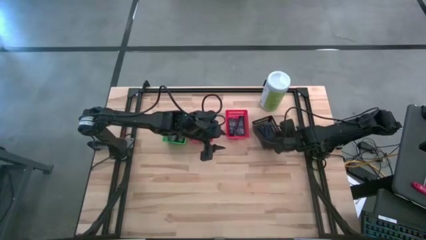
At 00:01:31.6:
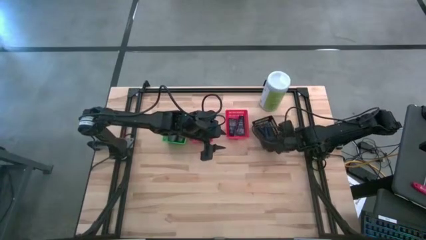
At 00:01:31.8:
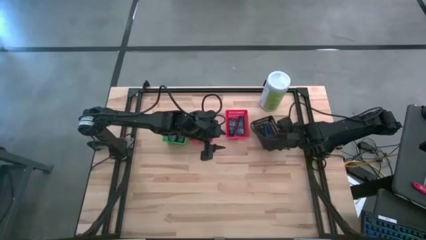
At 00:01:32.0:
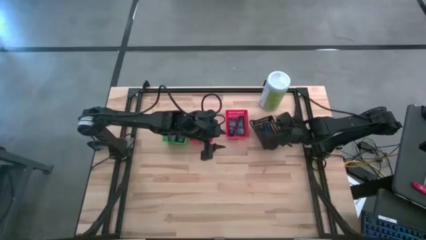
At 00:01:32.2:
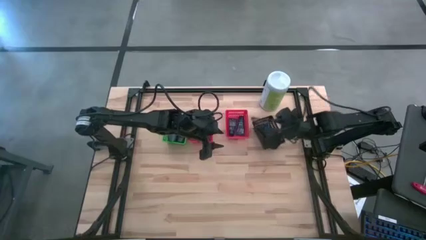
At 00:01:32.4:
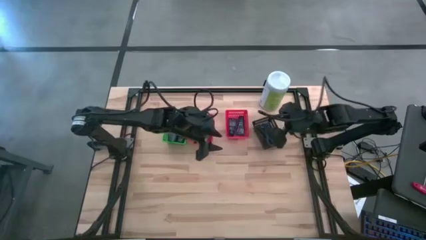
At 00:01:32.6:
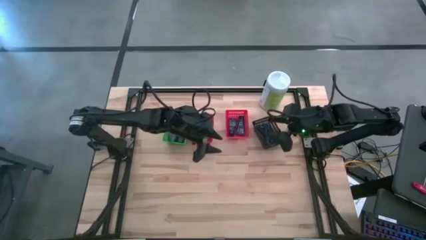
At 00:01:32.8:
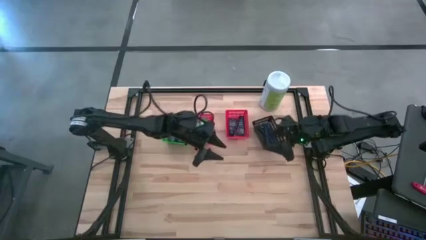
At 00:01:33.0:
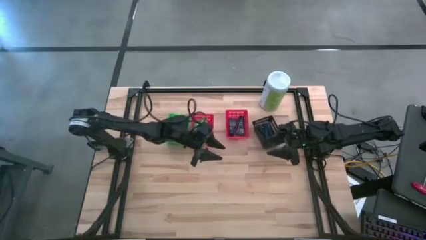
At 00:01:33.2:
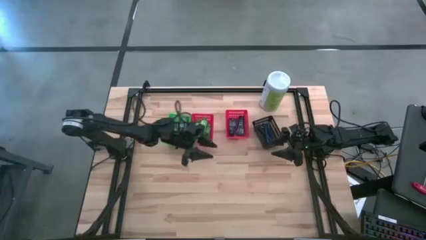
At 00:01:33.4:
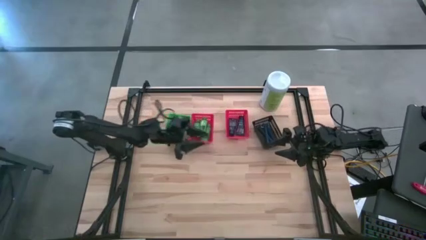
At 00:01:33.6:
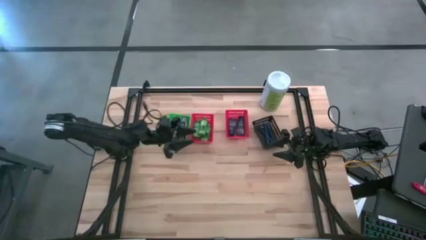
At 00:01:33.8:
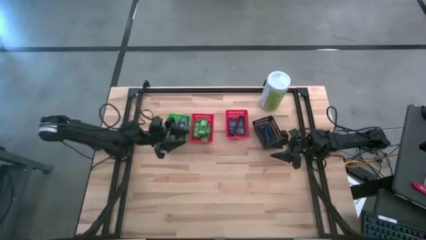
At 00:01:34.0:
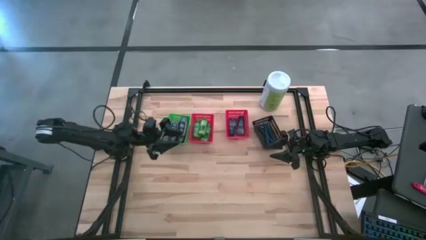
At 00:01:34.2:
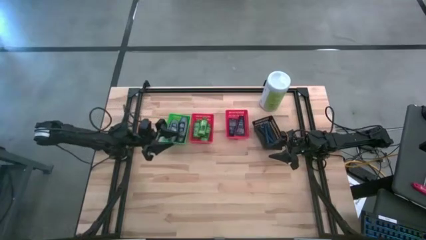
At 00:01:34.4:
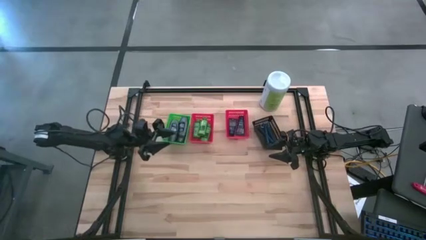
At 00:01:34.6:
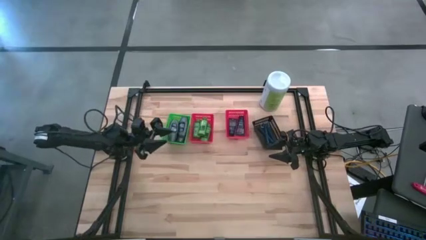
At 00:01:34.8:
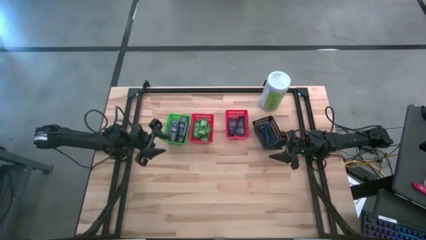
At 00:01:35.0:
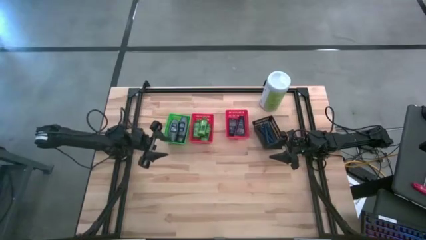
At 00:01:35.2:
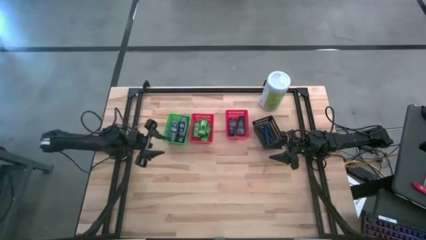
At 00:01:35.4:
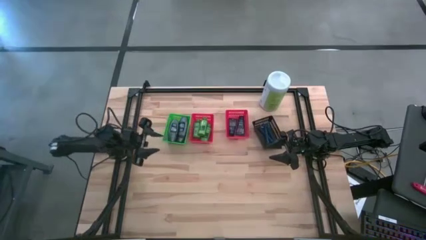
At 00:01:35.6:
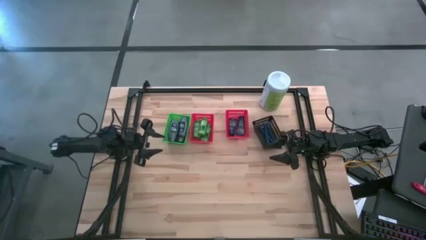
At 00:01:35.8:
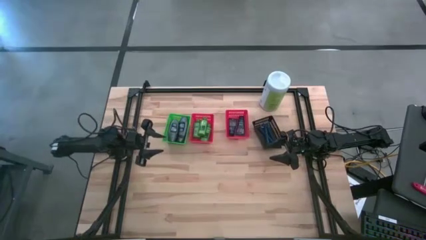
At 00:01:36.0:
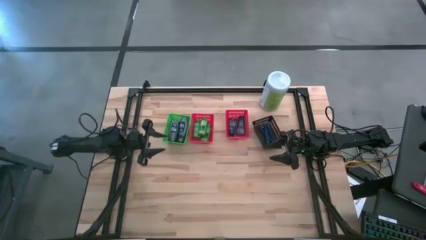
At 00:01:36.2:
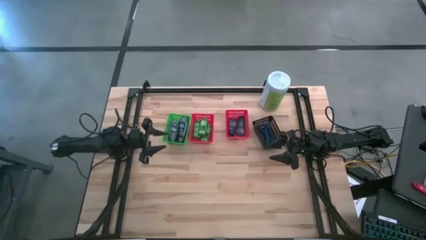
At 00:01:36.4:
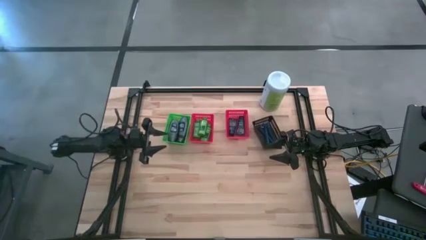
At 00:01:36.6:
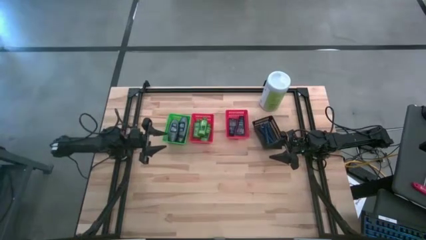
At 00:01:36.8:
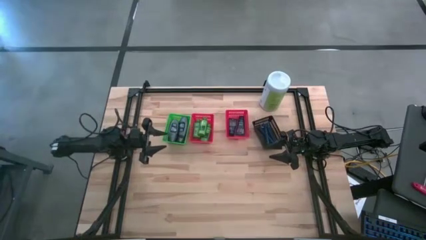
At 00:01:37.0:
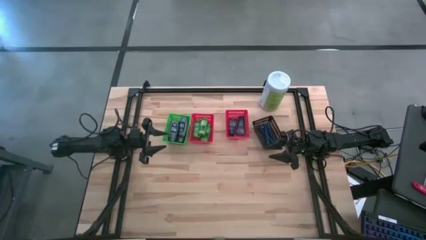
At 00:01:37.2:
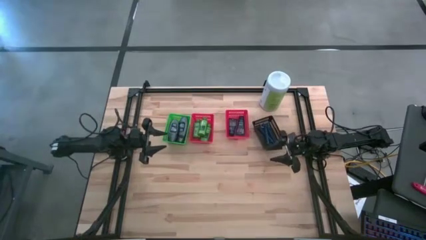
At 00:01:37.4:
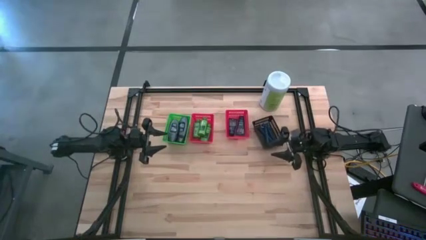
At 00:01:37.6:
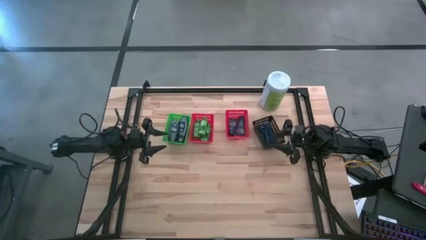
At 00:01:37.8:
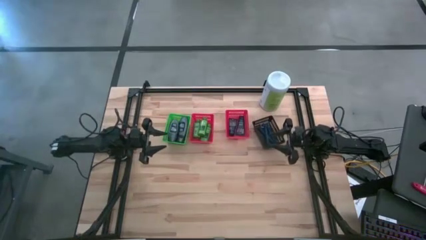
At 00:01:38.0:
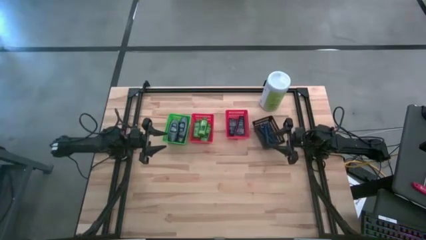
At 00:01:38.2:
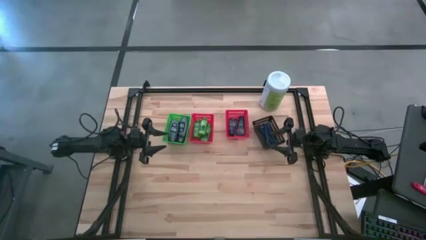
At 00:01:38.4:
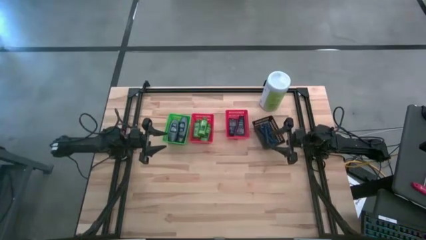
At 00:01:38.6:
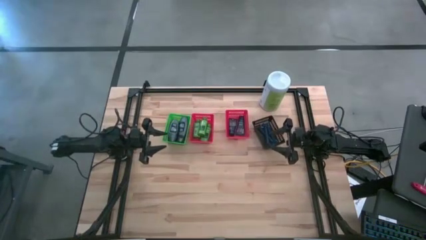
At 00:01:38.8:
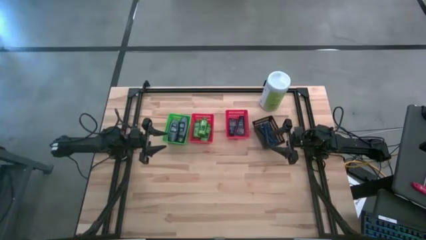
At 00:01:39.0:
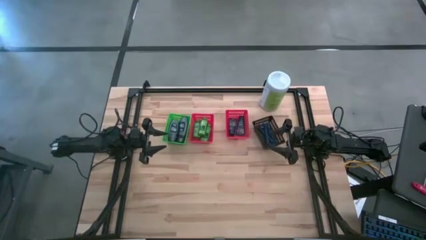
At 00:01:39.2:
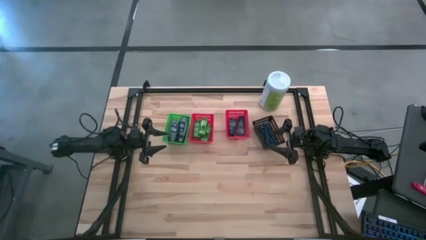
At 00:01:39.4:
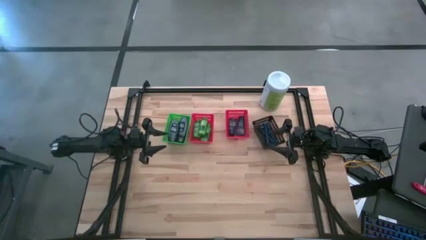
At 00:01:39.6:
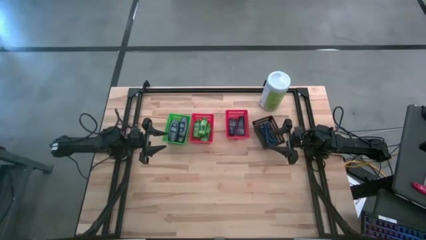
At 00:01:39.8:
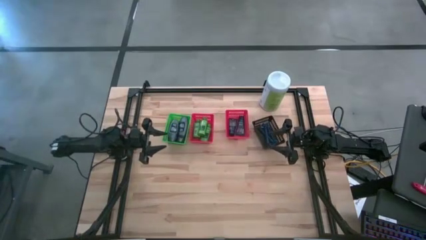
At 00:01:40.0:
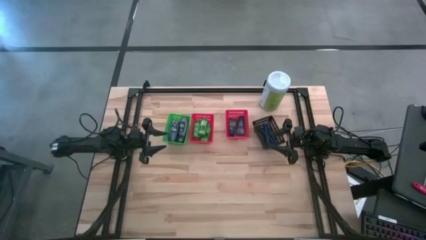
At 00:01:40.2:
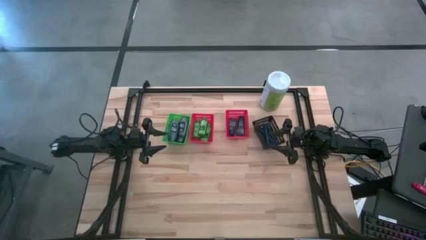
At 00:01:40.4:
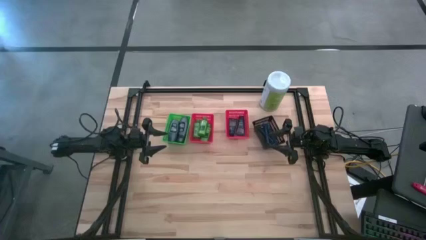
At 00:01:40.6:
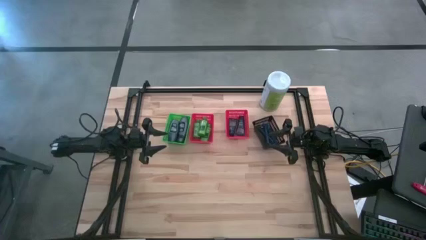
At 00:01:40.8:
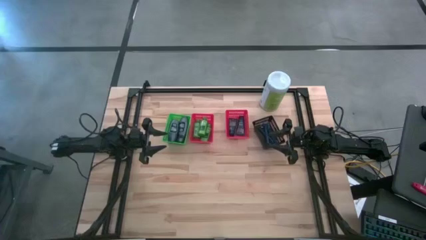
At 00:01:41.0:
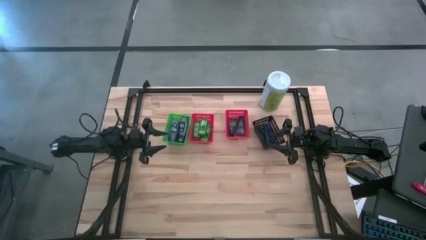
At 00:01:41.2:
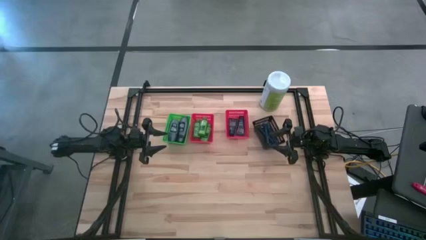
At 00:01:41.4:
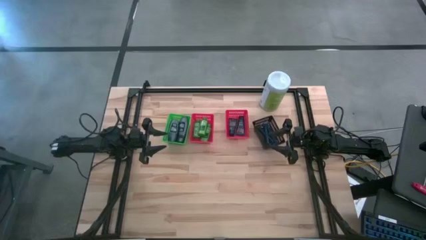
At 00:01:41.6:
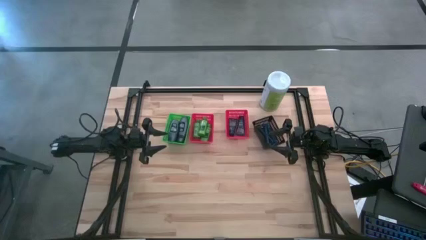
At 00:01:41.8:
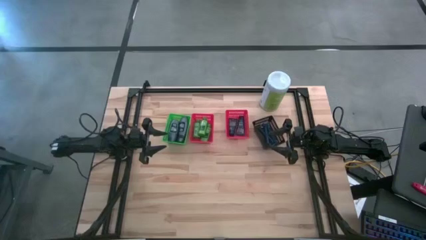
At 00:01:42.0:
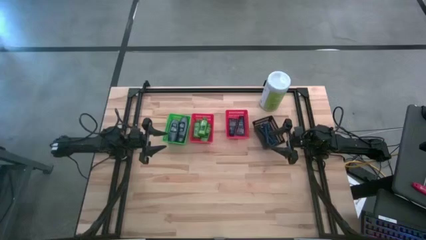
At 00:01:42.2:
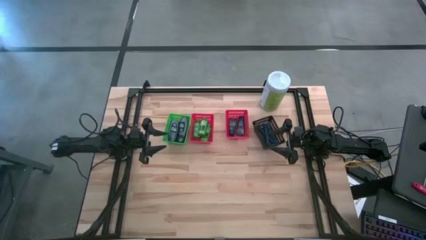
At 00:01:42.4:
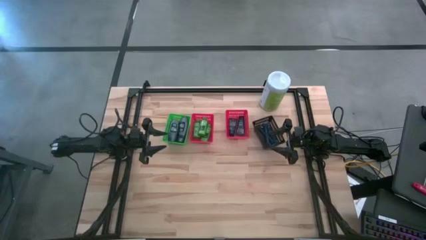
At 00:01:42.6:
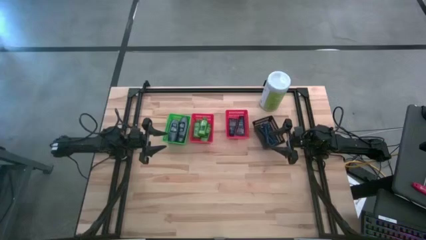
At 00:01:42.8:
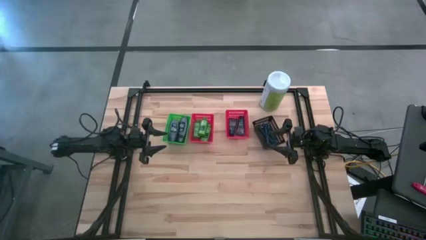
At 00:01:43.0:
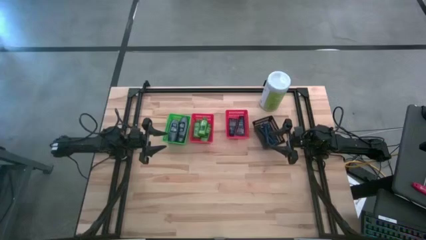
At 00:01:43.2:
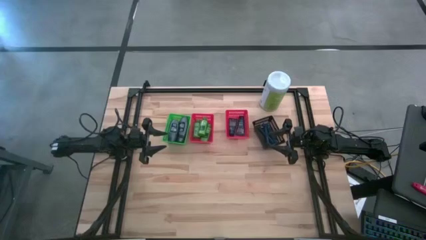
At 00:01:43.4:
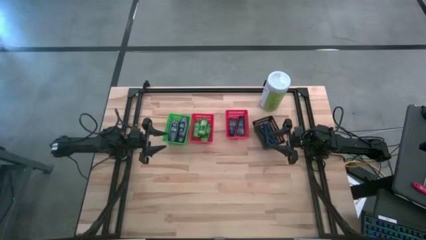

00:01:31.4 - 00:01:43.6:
Task: Pick & Place Travel size toiletries
Return to Home Position
